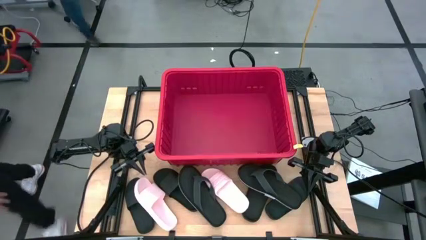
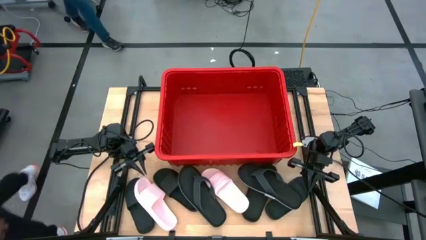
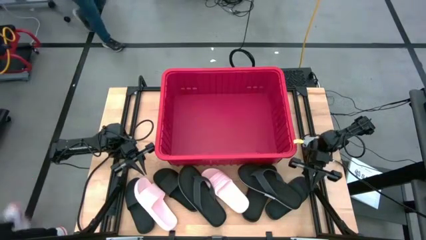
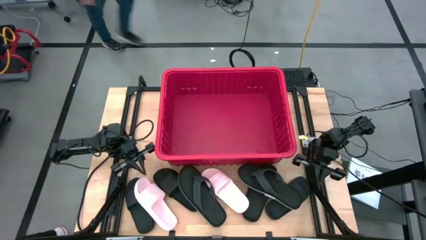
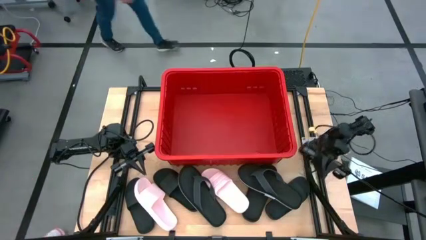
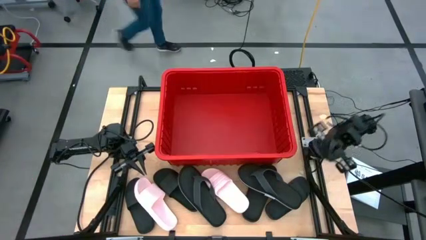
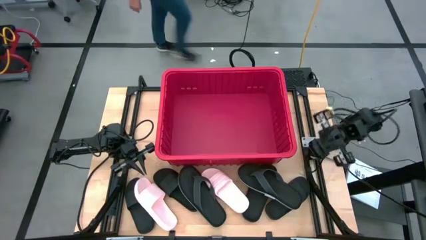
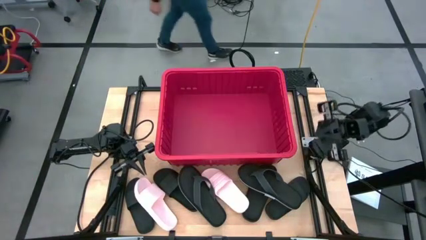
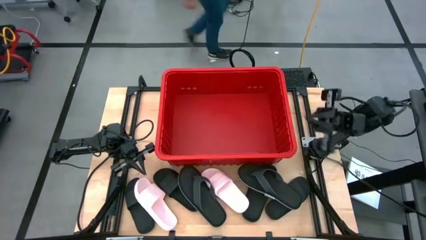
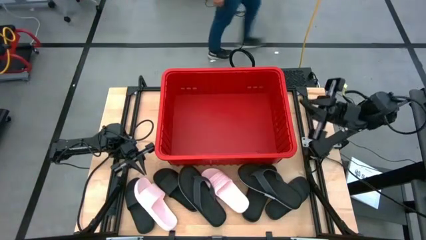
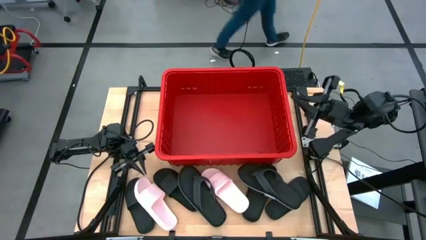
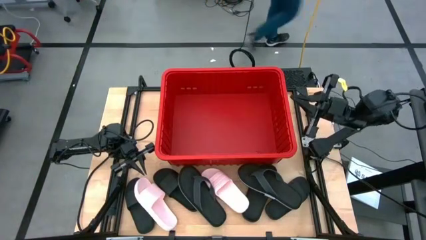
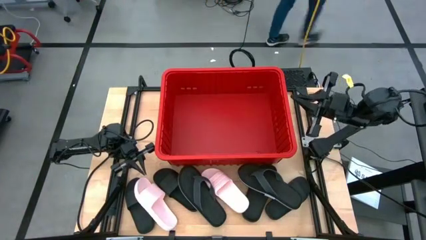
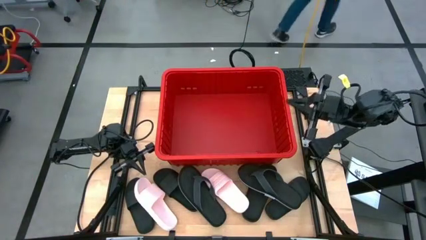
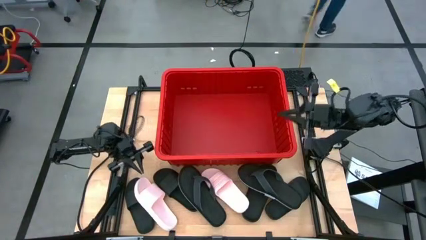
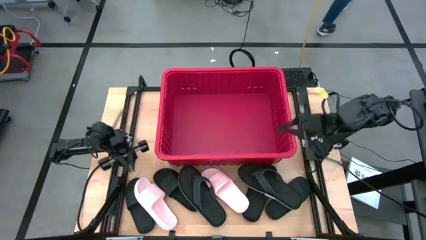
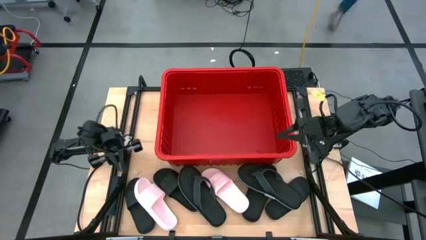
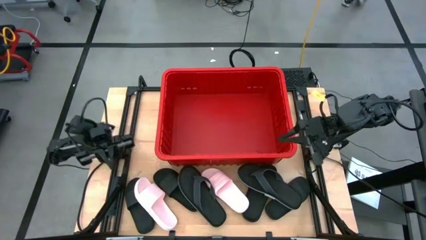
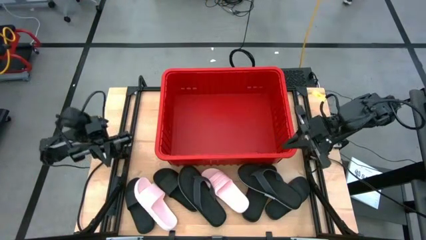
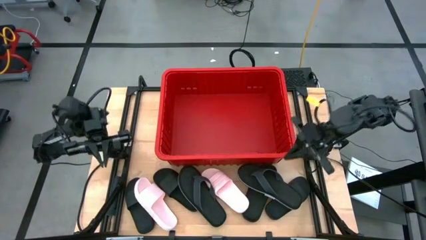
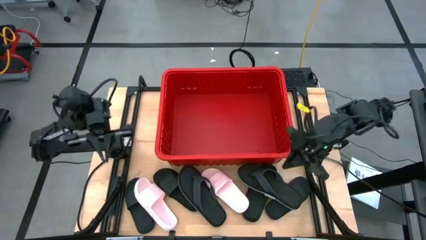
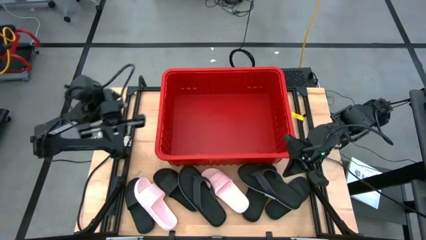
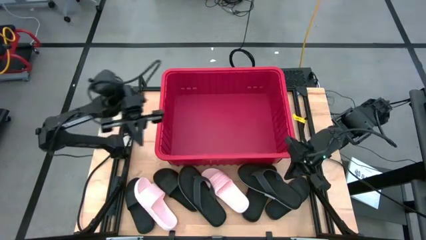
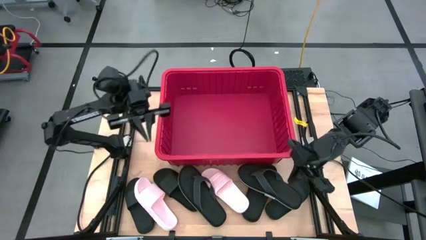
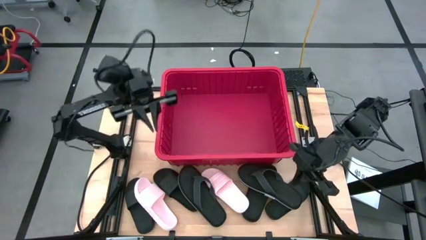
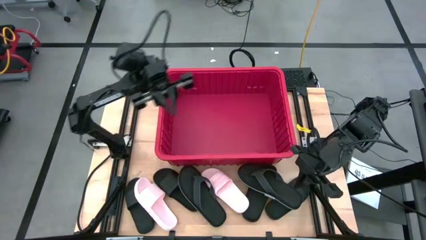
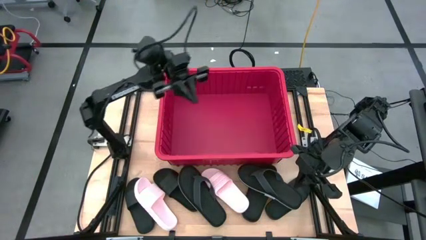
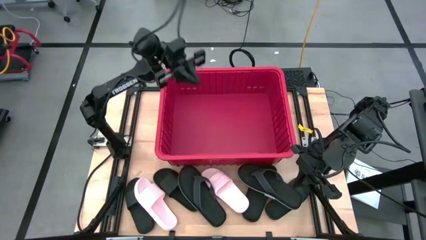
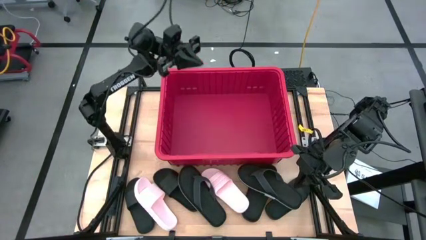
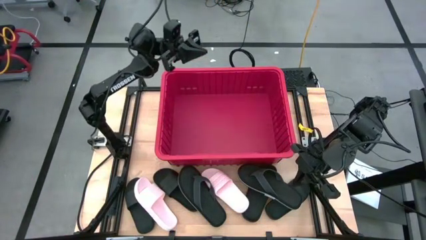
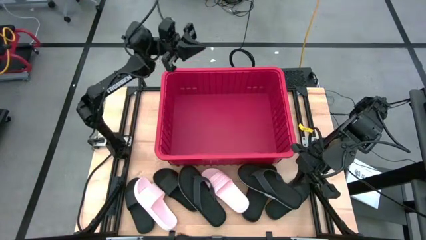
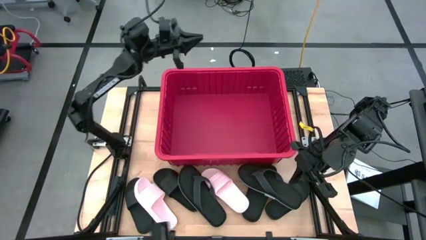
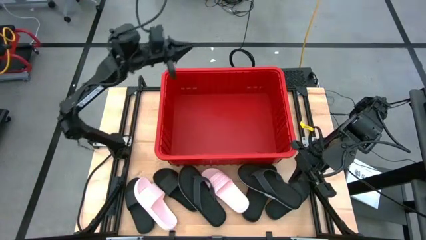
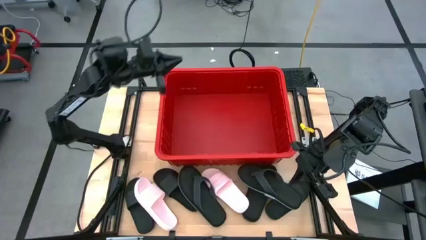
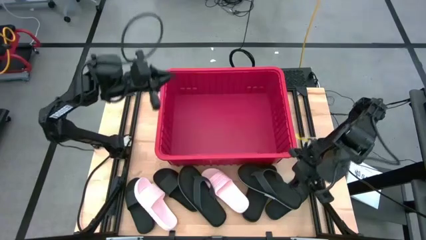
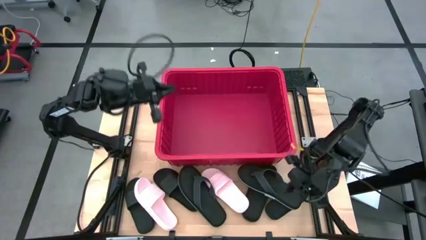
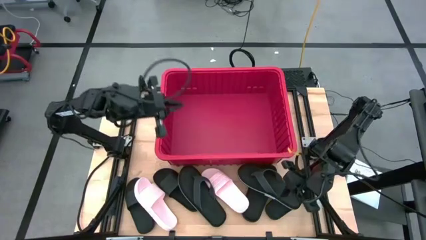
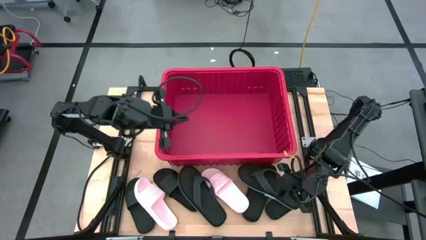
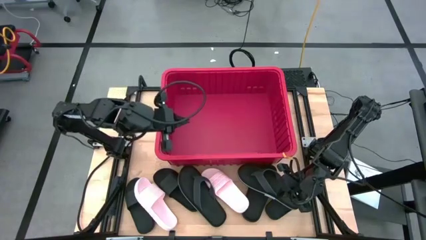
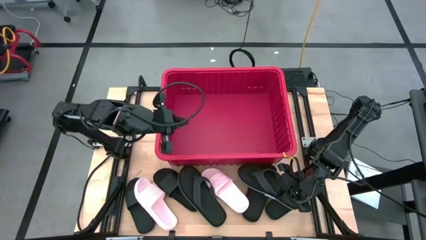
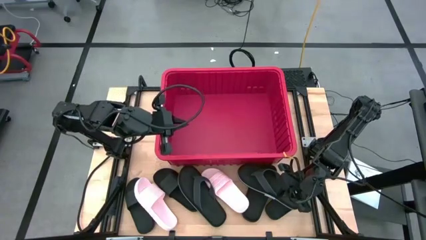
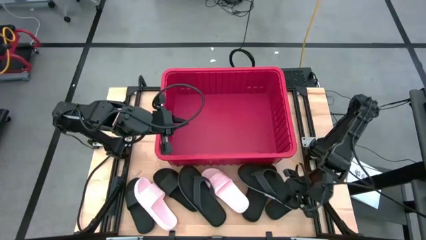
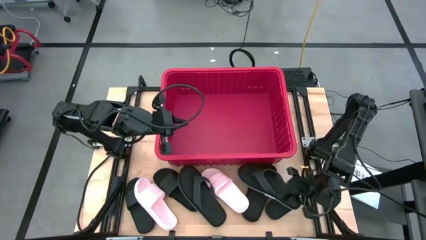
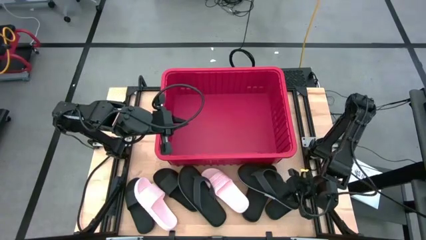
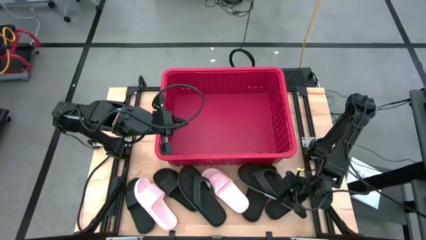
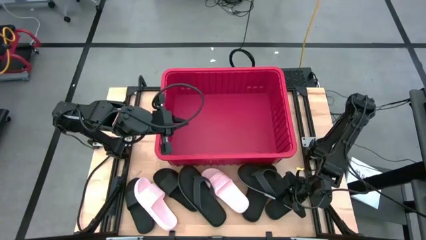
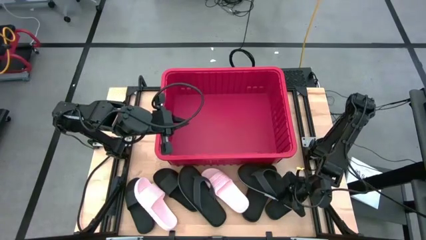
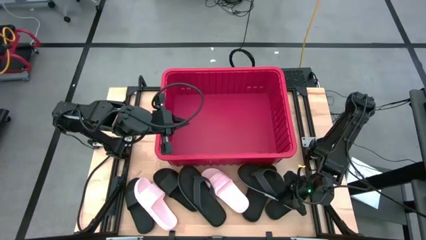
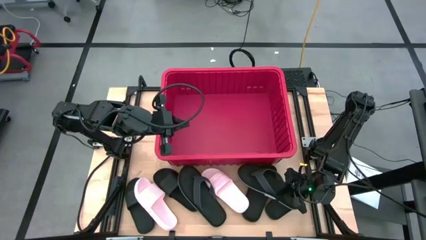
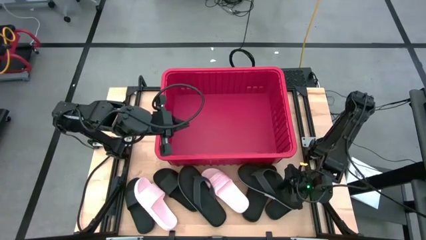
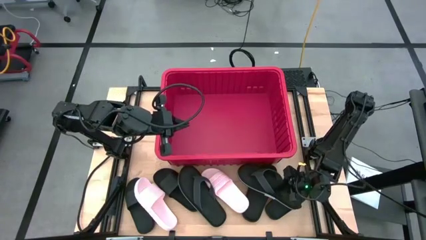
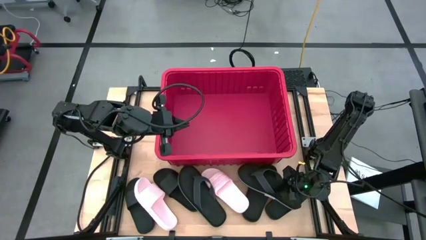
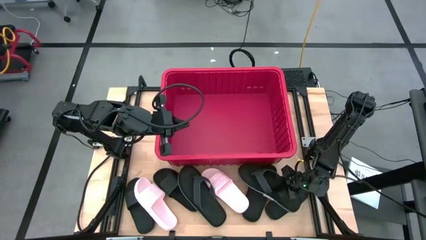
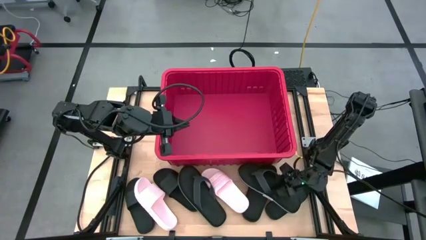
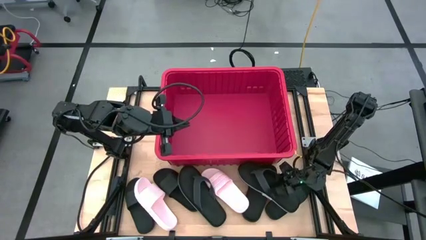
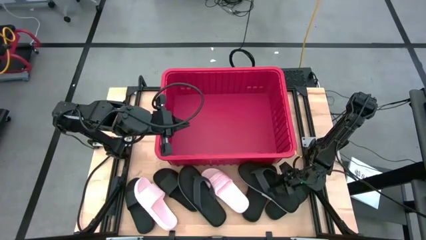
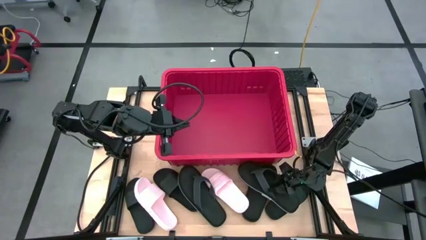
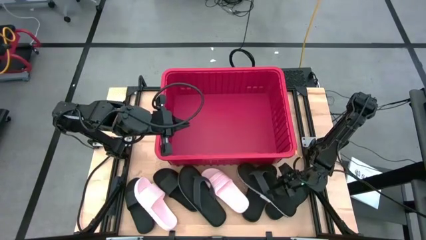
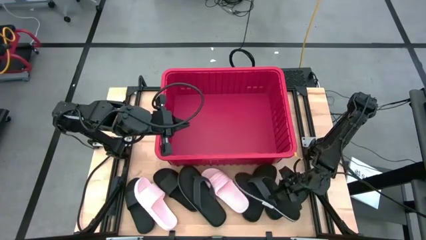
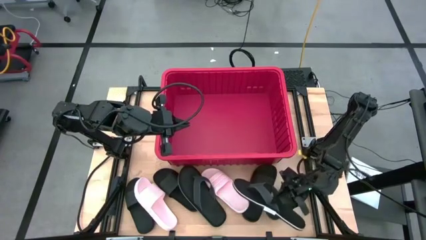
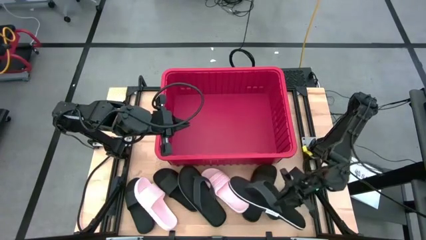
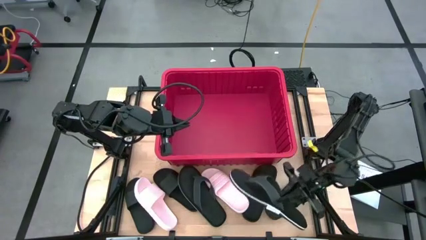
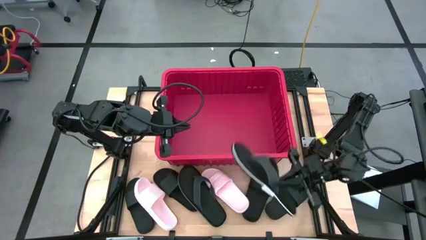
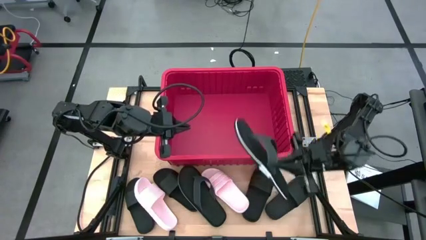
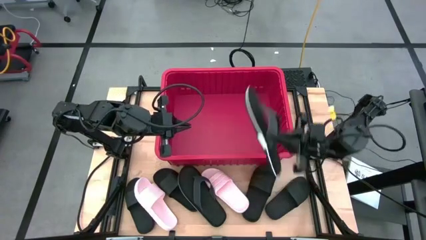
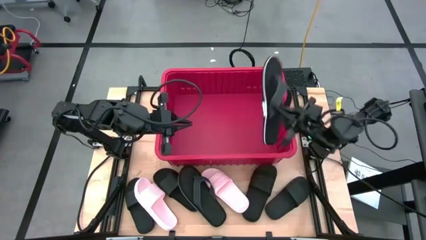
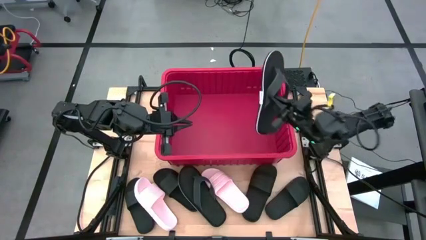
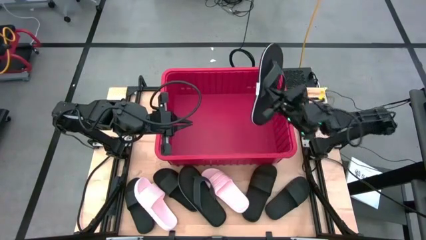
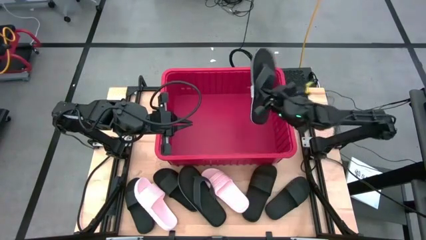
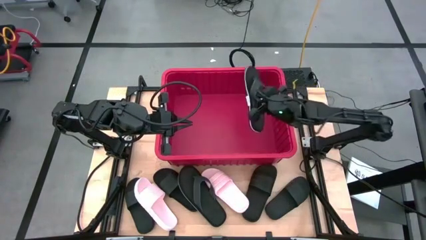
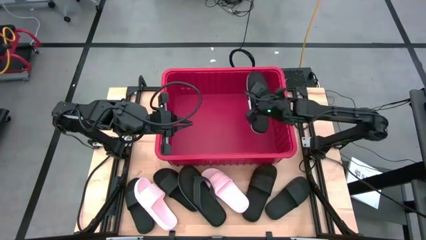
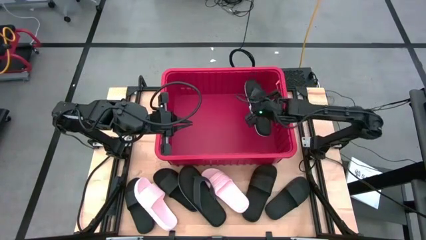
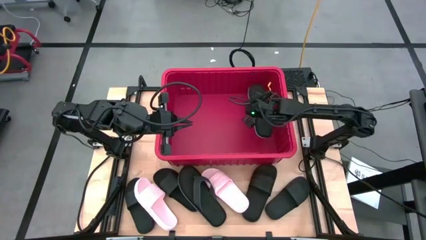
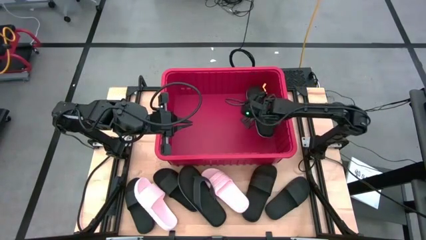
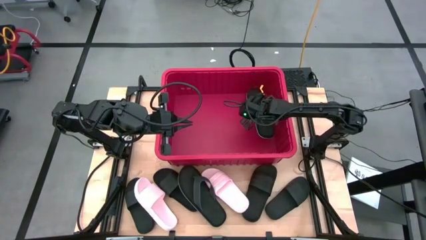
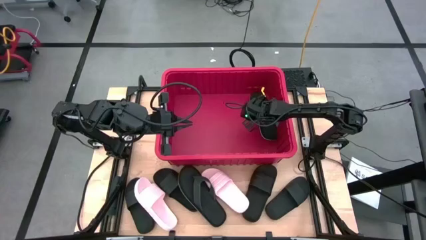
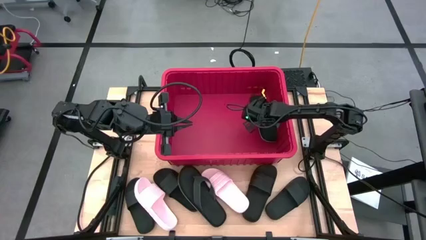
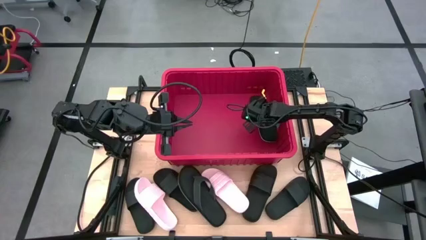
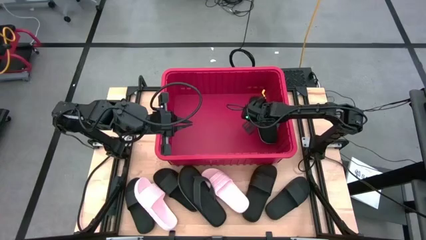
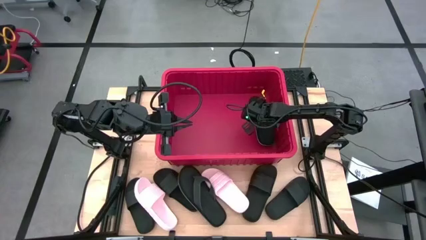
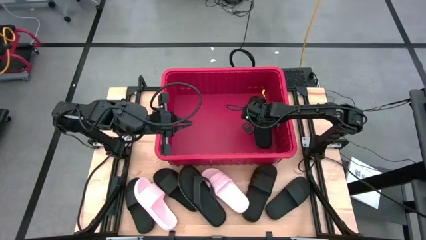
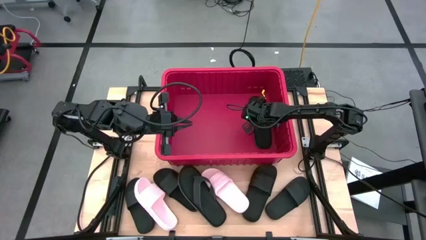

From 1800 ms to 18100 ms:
Task: Pick and place slides into bin
Put the black slipper into the red bin
